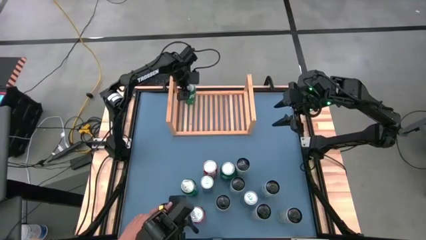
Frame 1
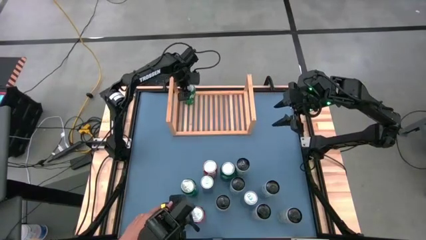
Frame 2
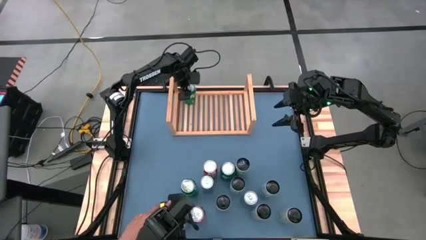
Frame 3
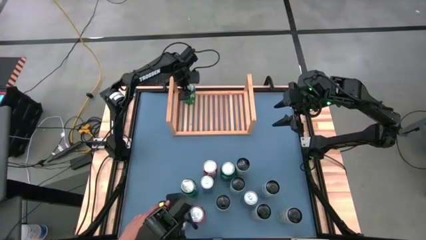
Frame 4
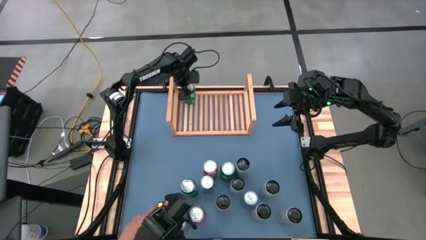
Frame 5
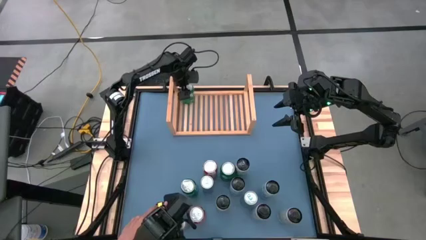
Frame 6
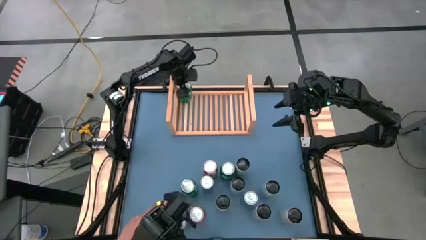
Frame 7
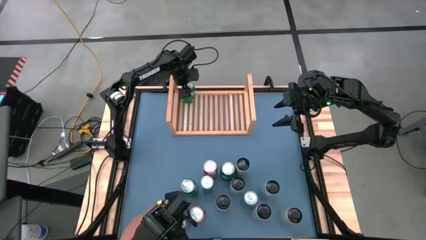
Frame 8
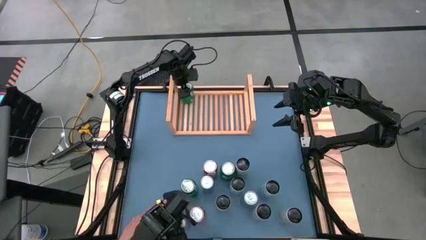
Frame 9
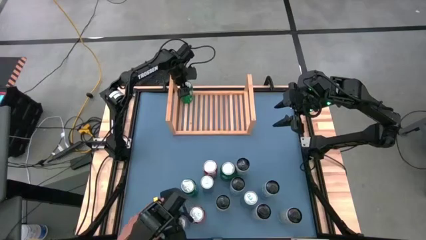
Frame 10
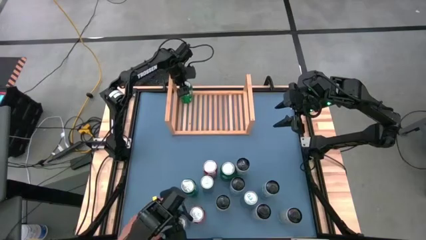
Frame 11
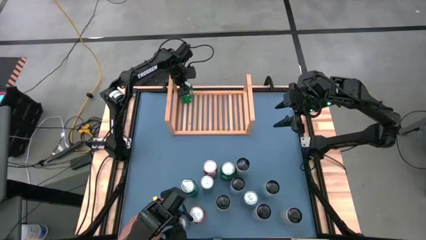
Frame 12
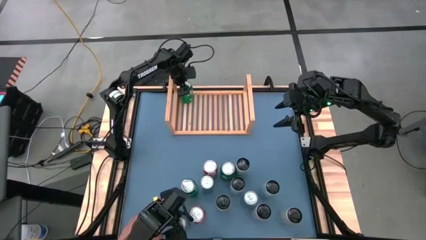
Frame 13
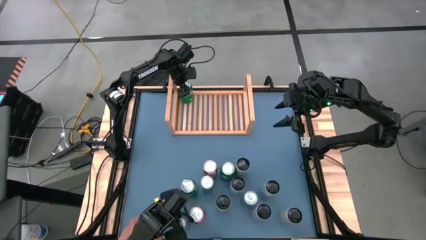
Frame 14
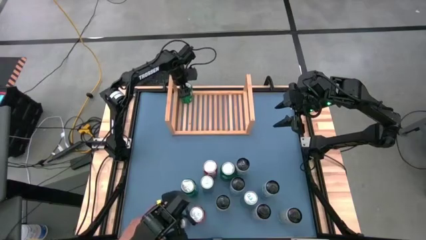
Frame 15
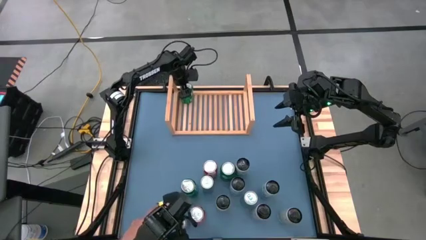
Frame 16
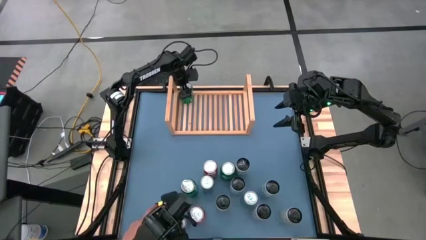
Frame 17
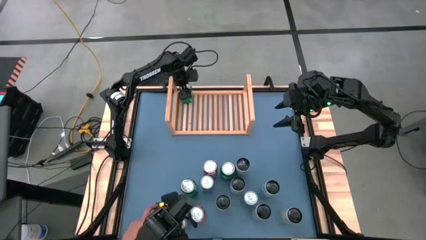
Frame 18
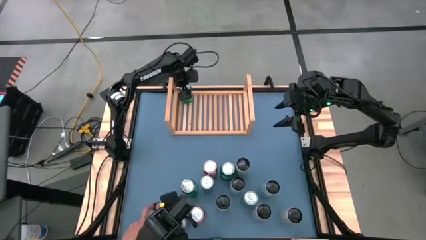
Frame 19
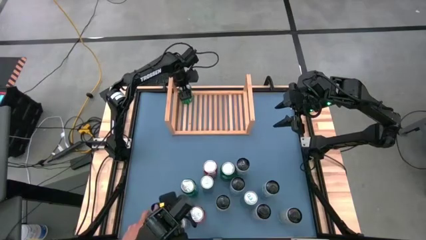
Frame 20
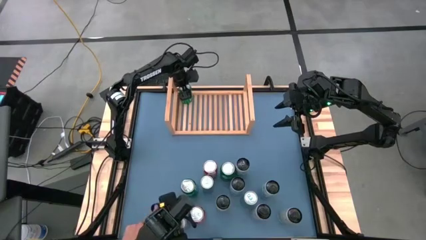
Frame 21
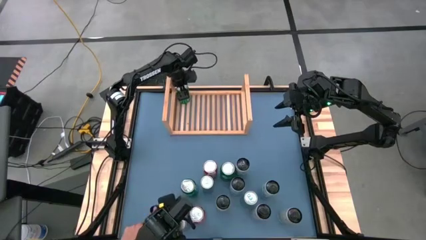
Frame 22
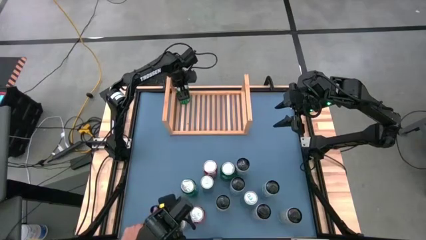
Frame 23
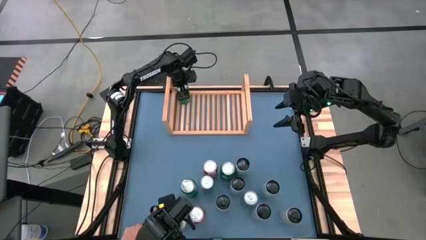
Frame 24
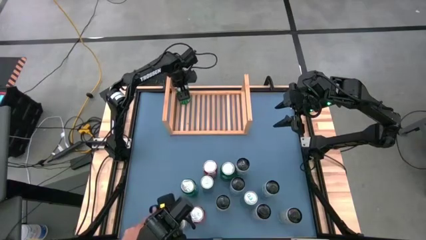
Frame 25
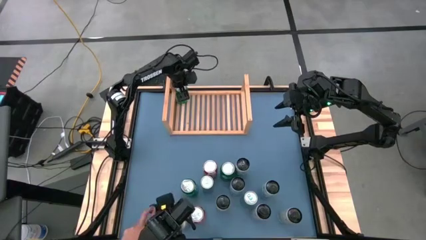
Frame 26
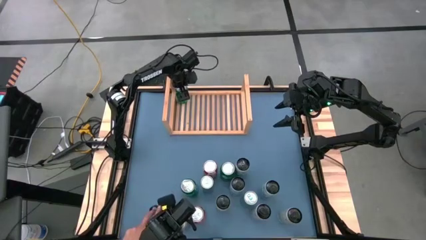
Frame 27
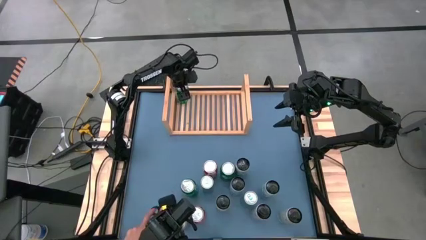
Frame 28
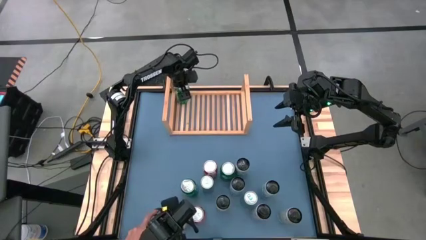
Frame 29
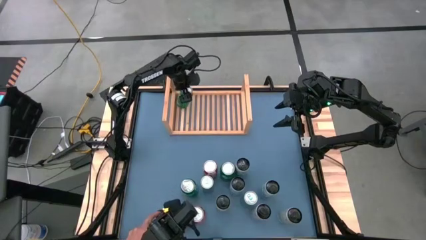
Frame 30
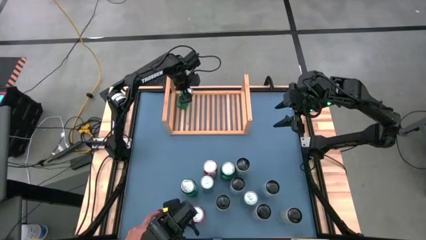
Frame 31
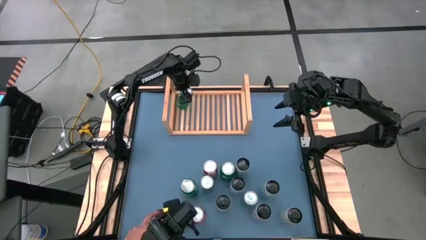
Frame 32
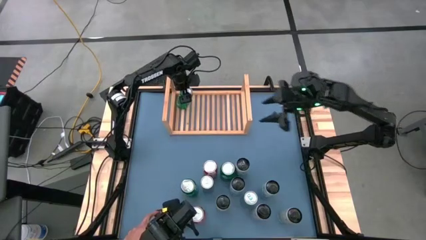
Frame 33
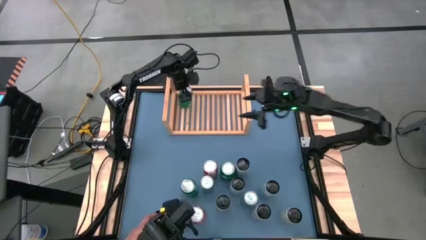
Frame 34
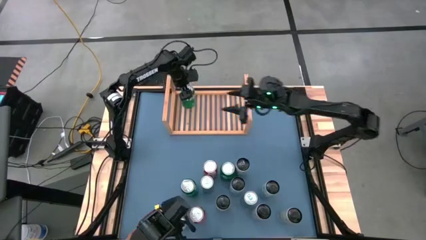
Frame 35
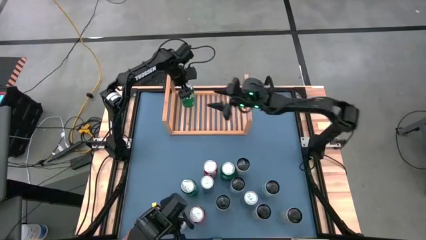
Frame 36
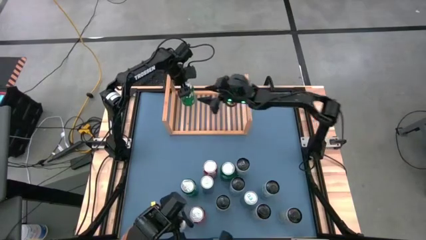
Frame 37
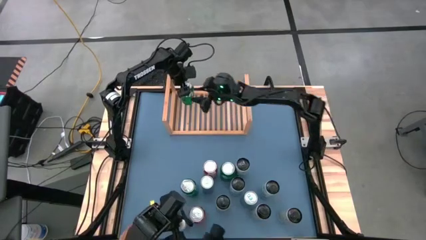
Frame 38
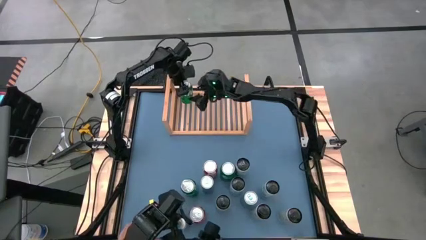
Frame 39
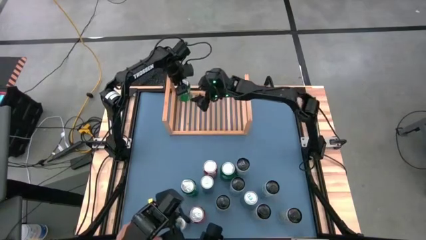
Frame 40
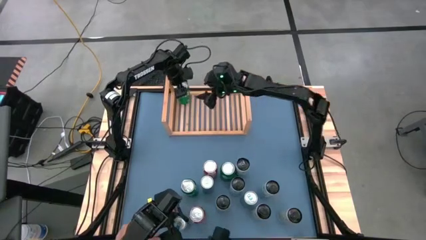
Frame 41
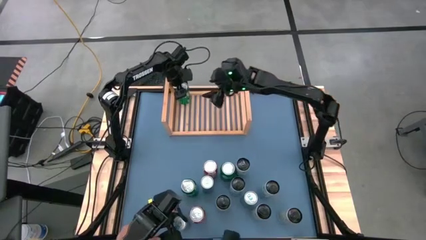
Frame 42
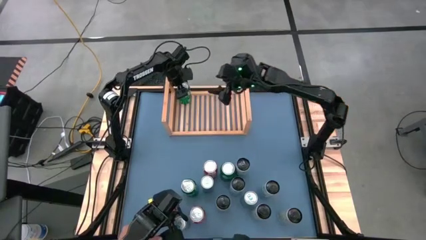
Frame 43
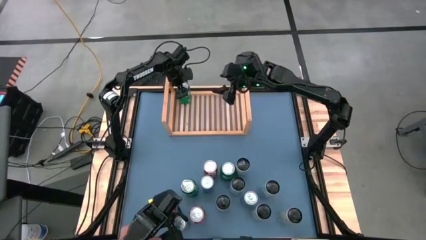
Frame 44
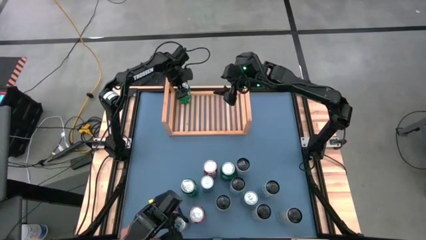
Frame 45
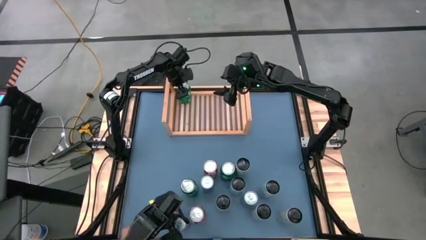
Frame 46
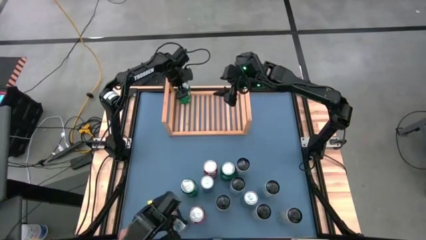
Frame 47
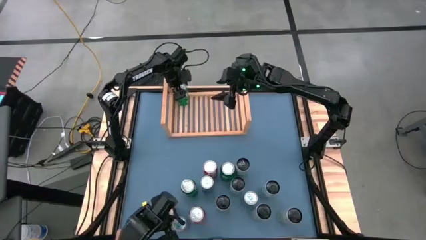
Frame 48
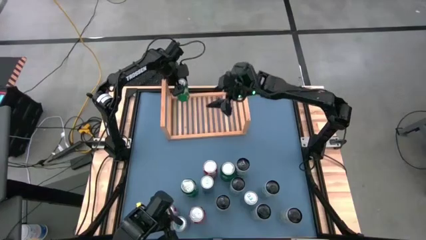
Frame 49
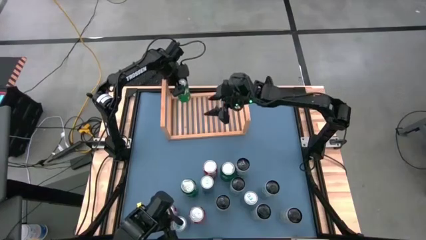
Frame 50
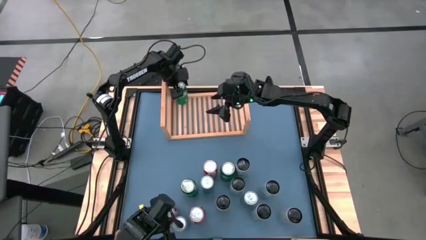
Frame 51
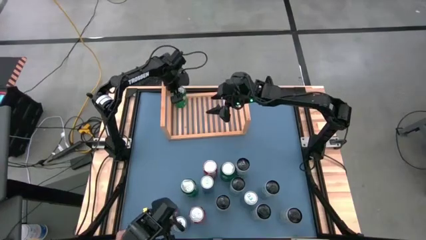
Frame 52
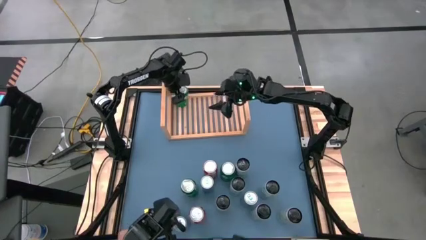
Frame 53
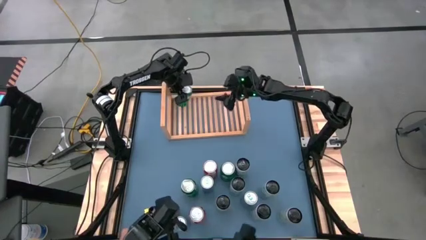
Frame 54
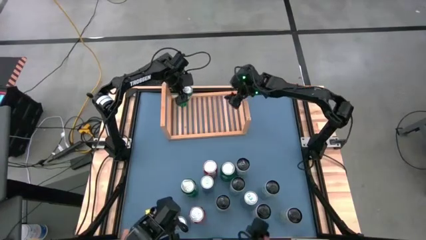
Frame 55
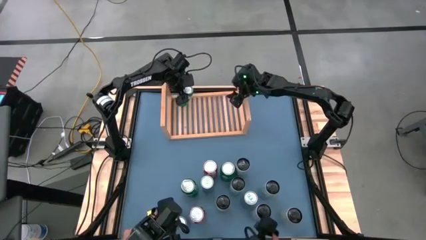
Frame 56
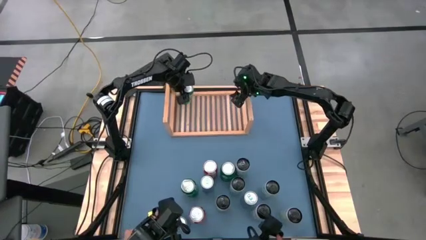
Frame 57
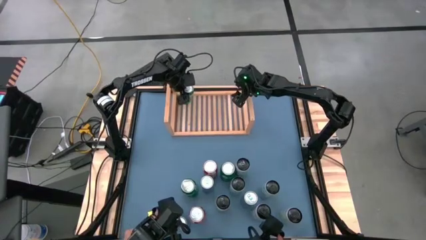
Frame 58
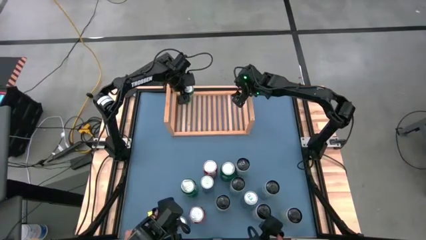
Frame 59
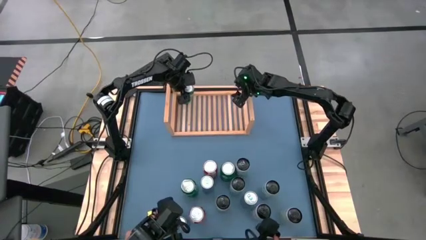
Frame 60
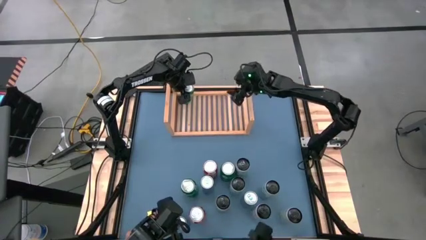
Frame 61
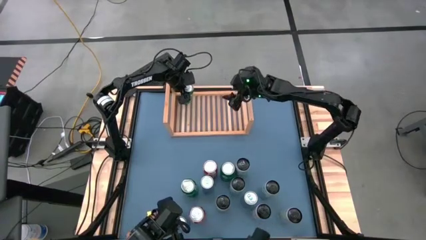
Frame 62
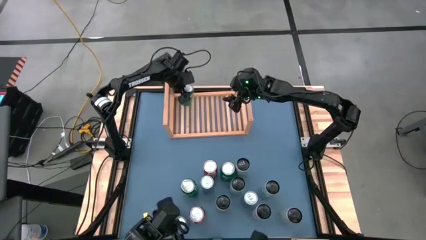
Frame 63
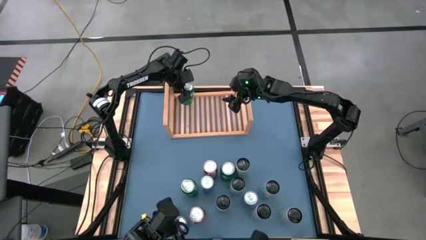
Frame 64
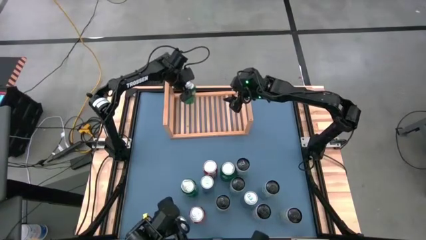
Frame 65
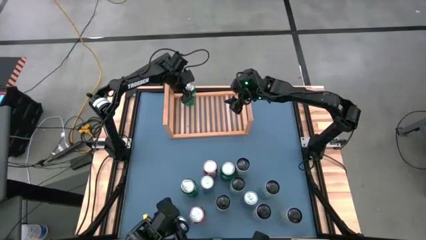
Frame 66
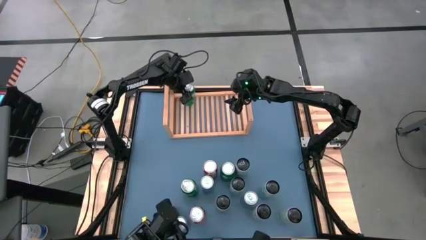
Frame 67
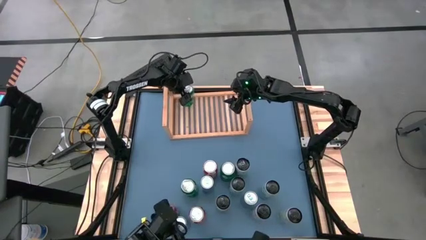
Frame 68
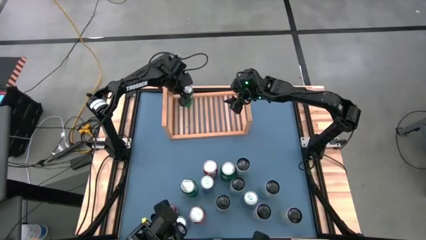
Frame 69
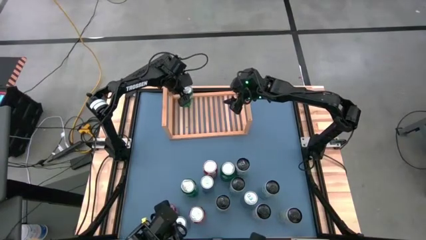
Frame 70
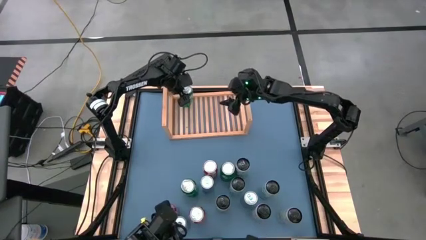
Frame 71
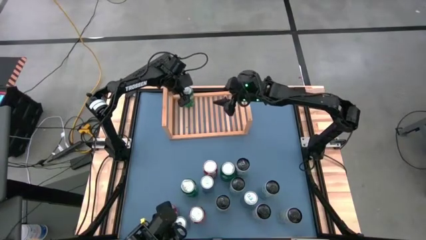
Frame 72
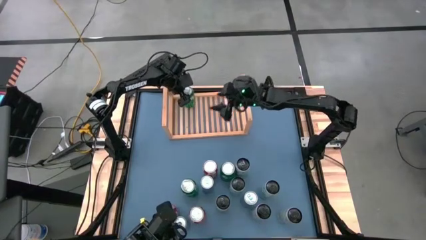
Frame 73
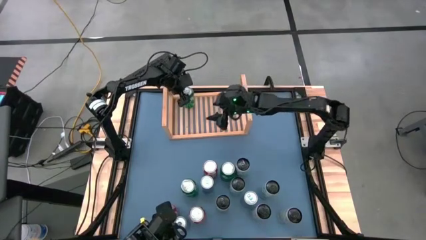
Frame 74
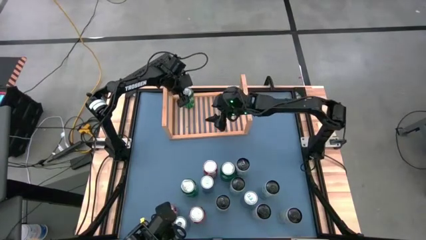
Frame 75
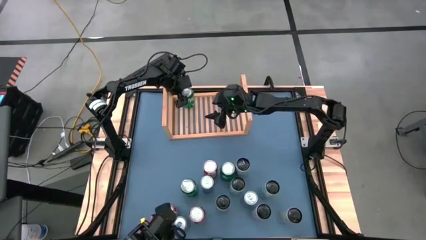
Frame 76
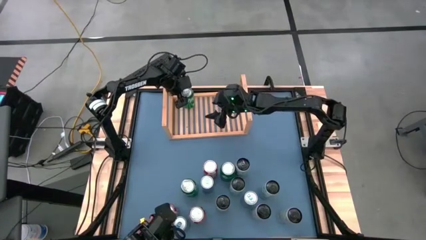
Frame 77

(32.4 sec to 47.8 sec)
Task: Place canned beverage on shelf
Adjust the green soda can on the shelf
